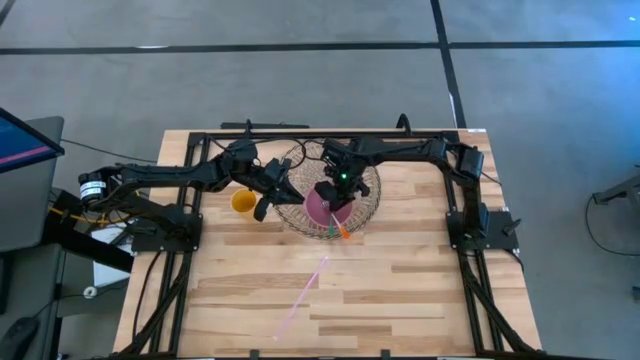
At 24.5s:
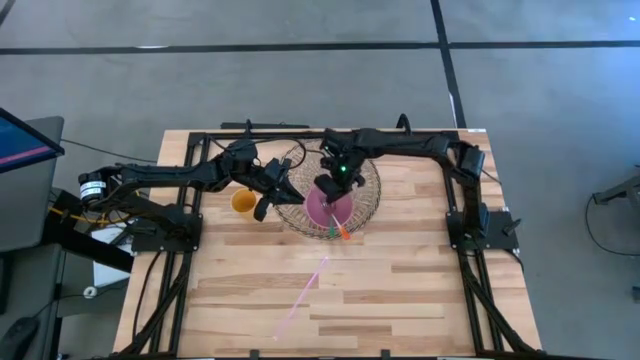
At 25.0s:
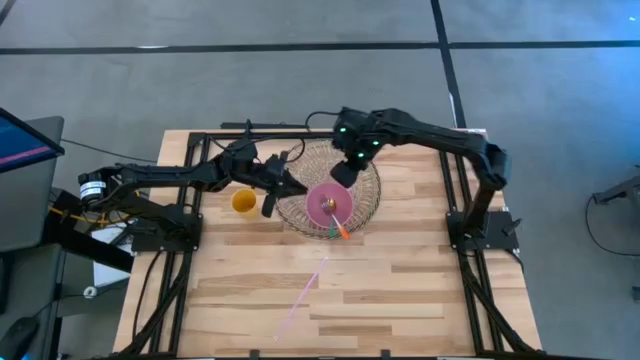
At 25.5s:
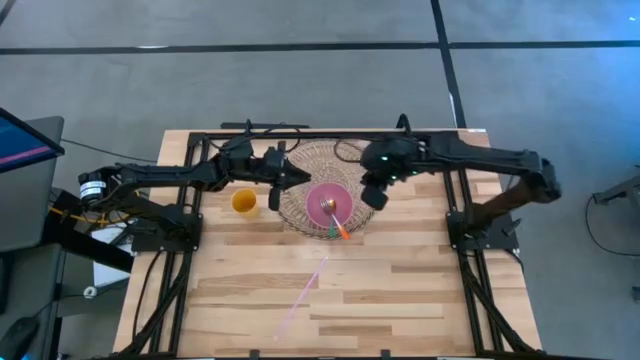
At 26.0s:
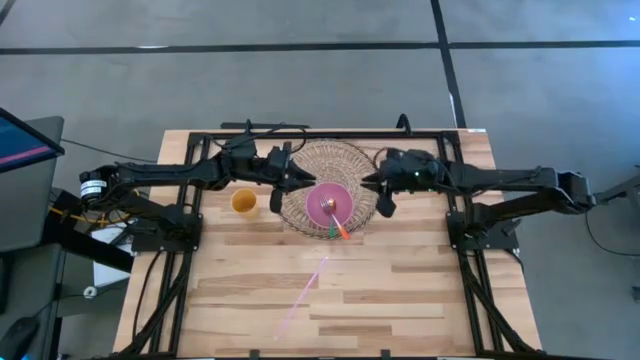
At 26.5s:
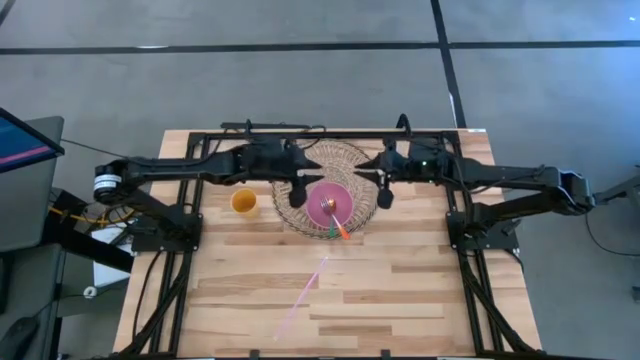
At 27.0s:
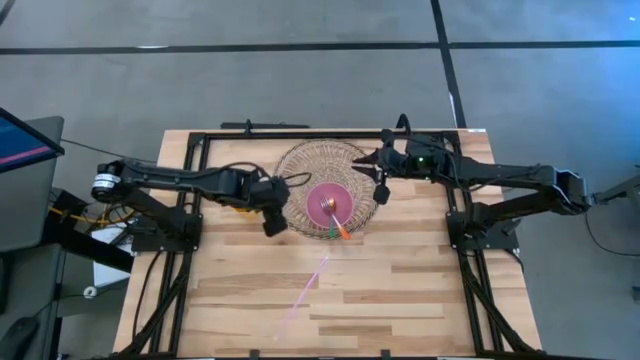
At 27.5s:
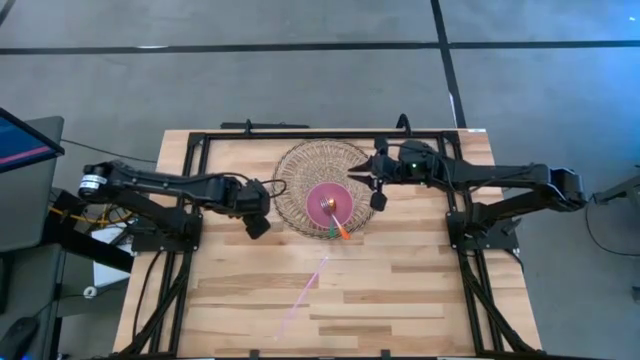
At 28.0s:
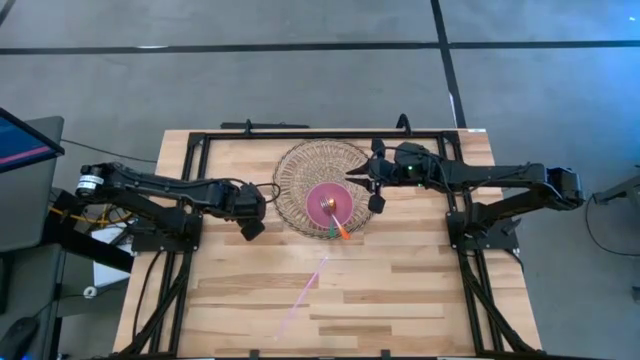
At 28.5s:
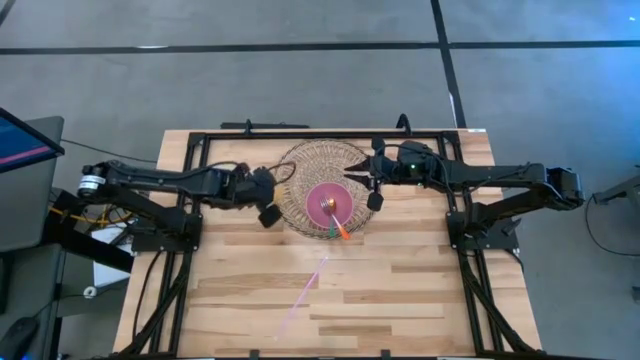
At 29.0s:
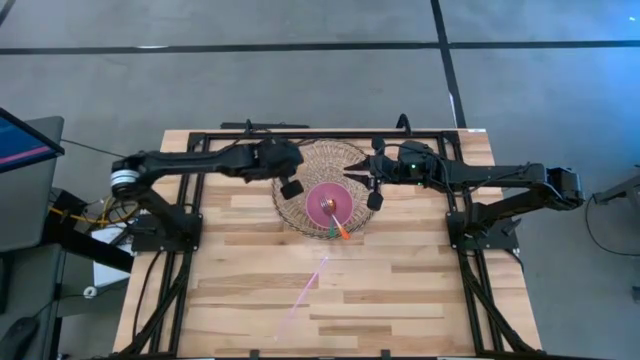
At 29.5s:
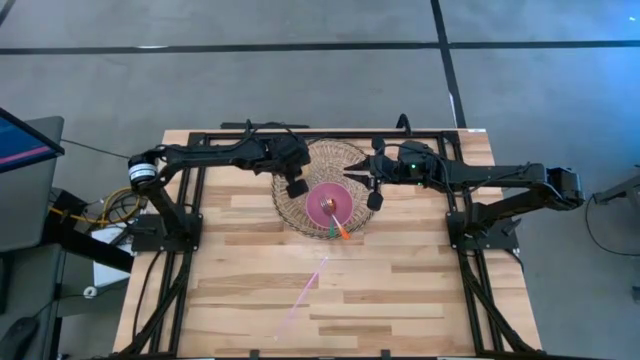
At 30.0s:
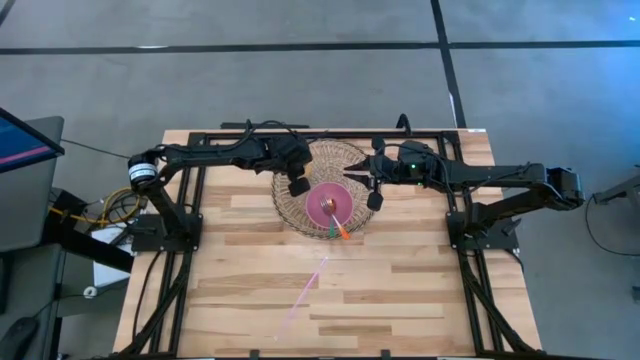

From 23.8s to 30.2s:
Task: Pick & Place Utensil
Put the yellow cup on the brown mat to the top left of the pink bowl

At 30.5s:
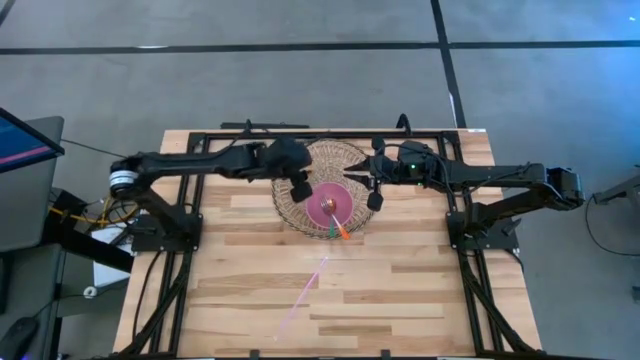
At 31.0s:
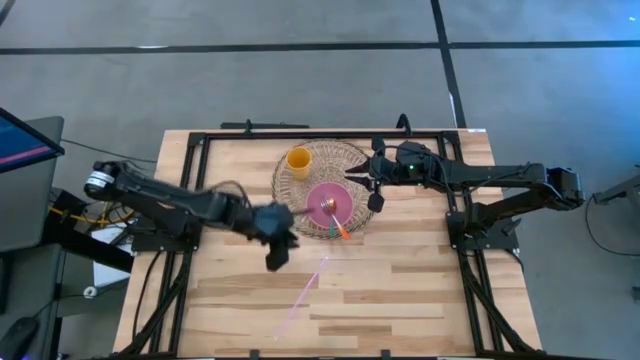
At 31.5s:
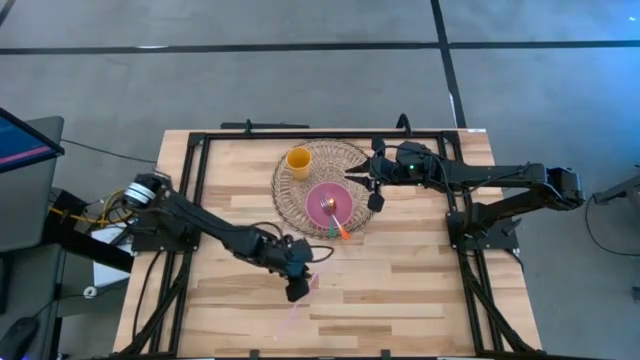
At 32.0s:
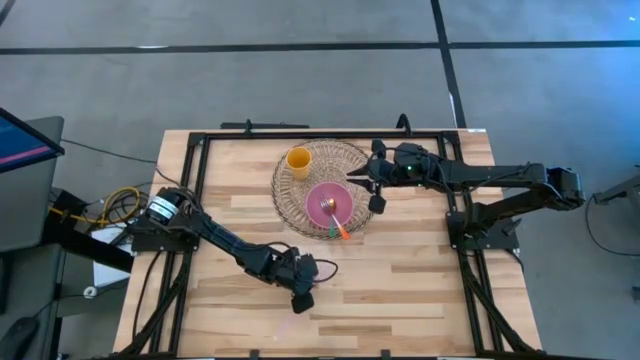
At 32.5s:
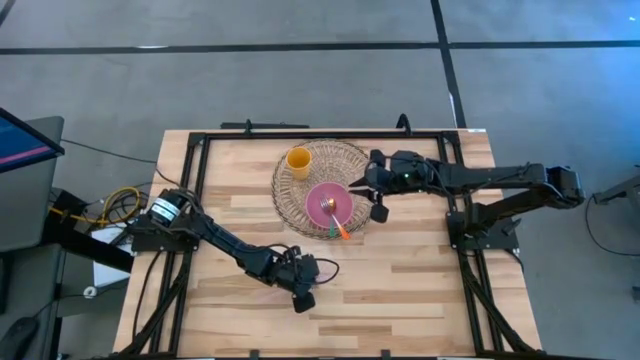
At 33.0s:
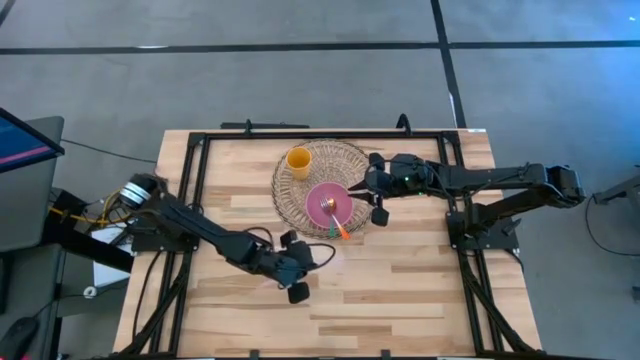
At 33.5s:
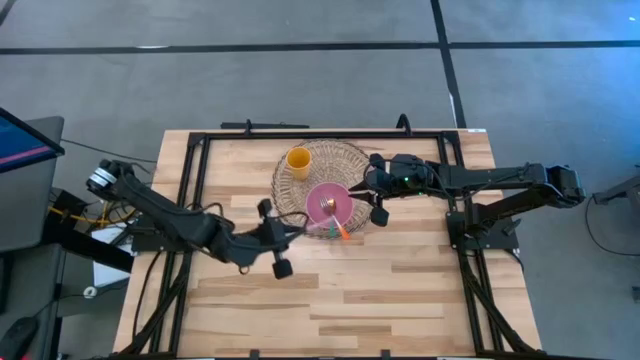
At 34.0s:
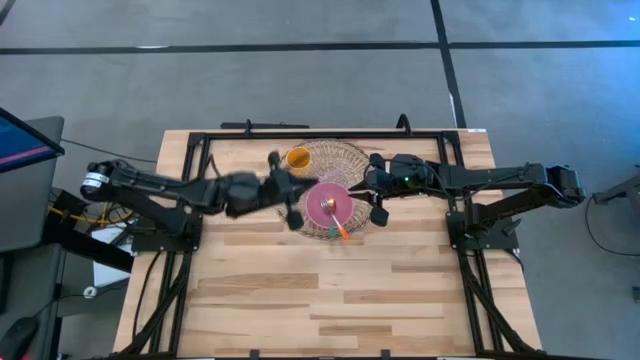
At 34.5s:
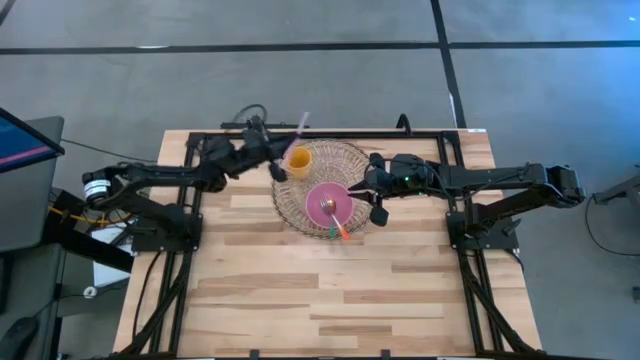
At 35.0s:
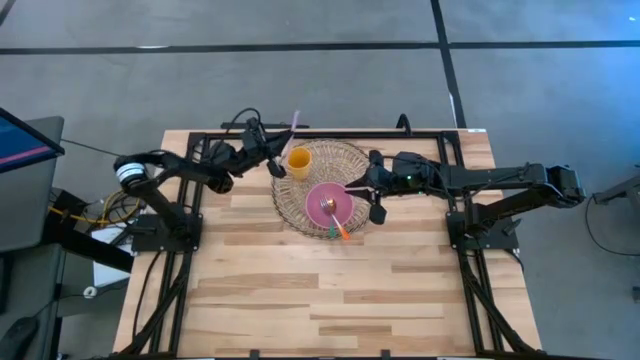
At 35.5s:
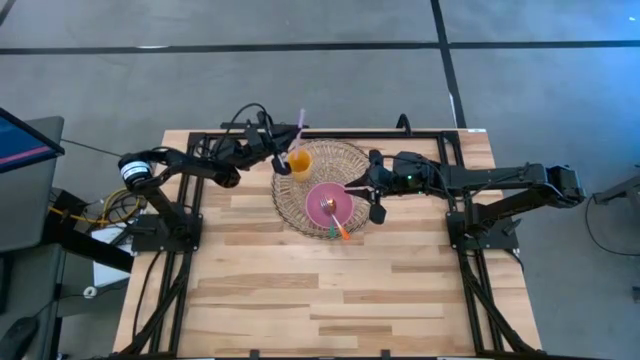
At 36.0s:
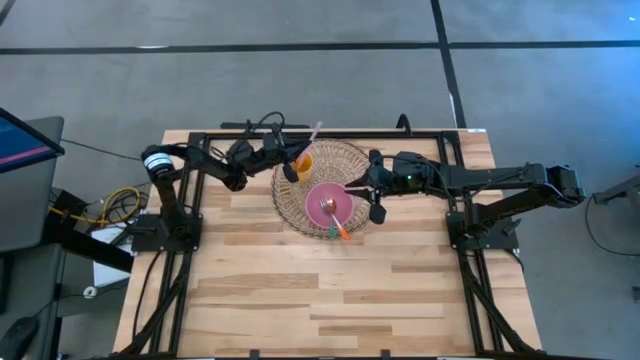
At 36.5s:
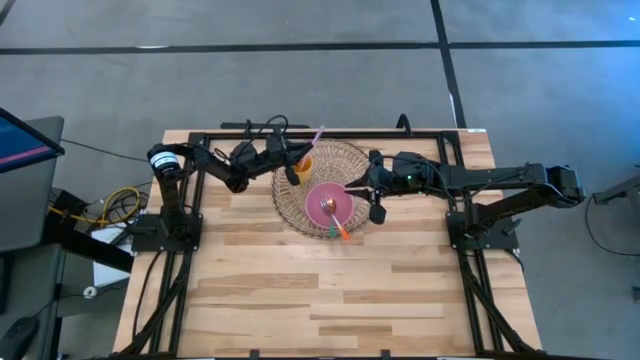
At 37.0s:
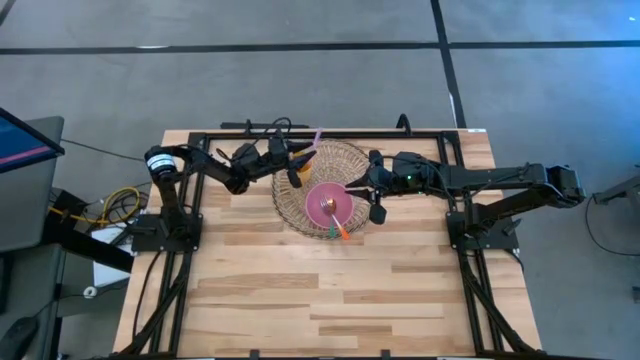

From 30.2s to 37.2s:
Put the pink straw into the yellow cup

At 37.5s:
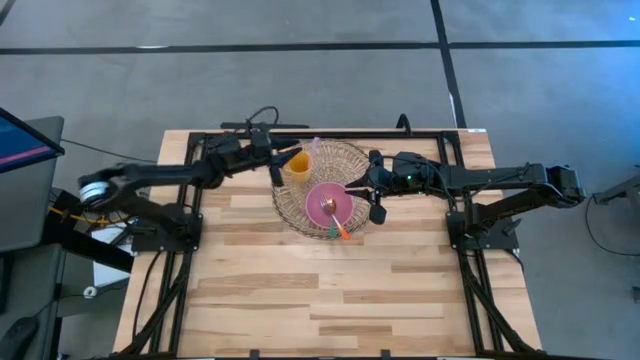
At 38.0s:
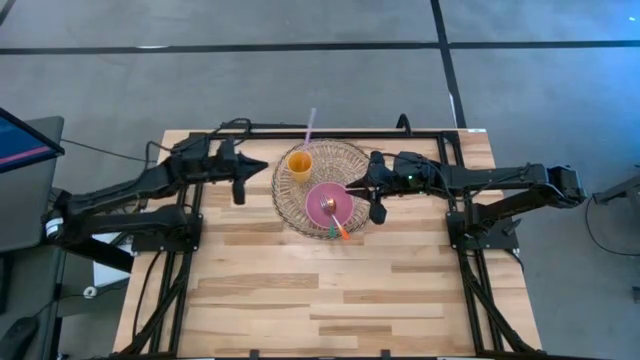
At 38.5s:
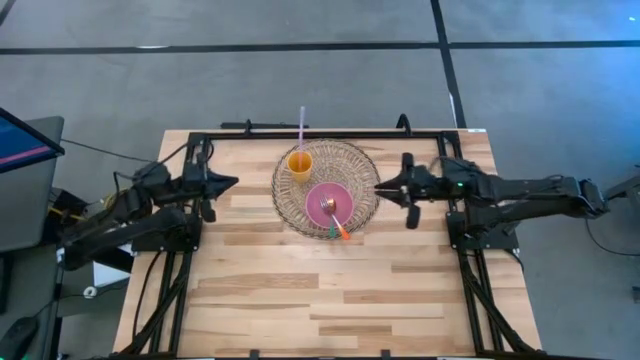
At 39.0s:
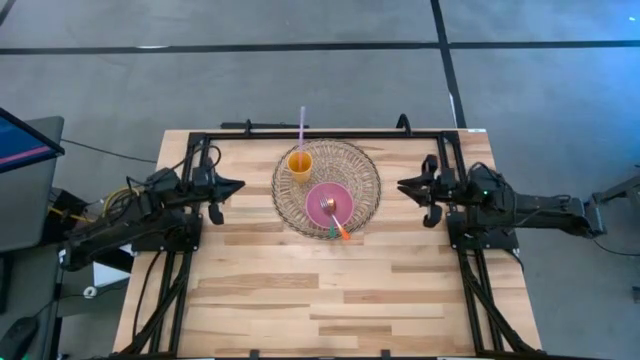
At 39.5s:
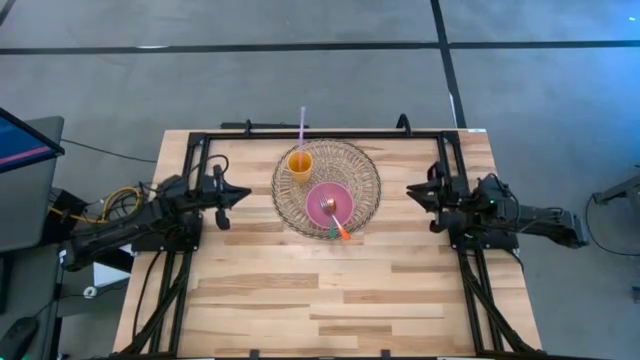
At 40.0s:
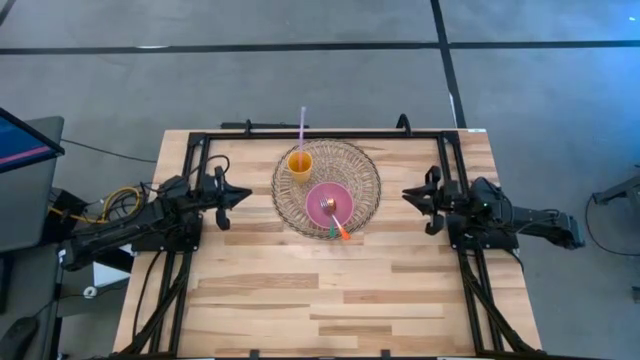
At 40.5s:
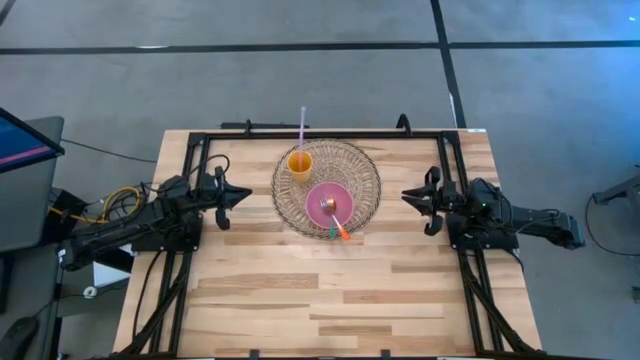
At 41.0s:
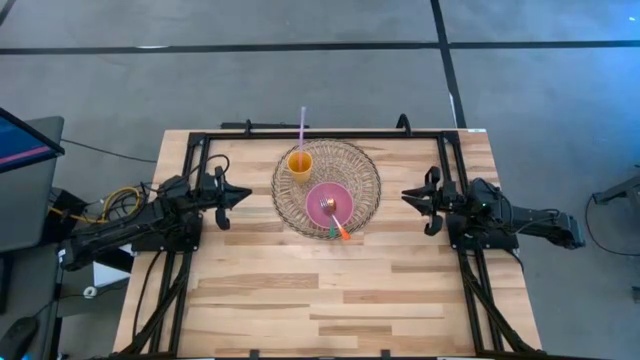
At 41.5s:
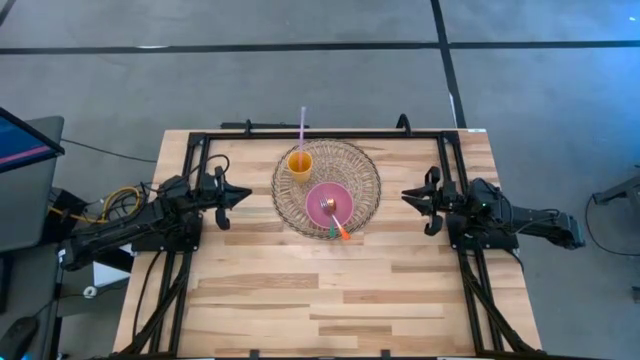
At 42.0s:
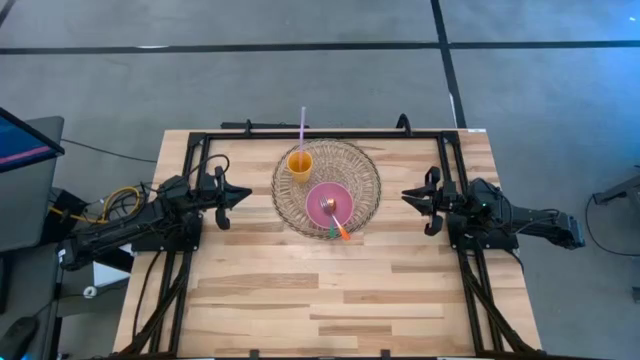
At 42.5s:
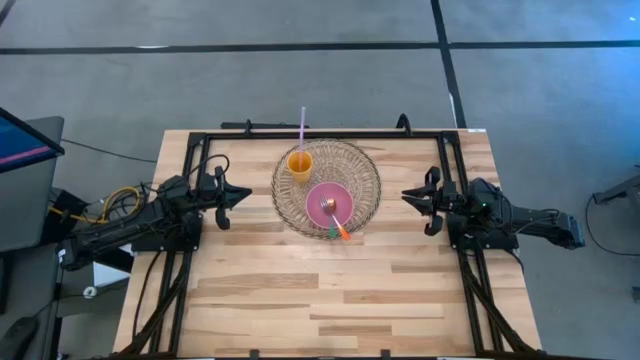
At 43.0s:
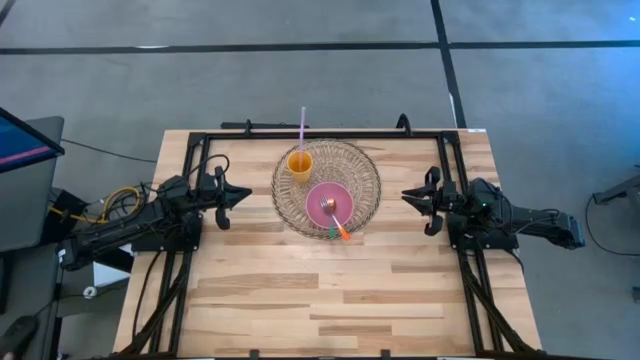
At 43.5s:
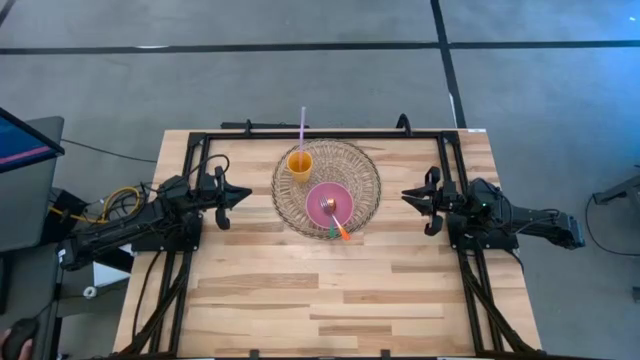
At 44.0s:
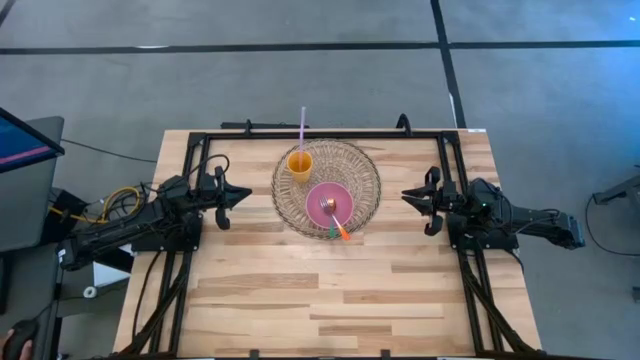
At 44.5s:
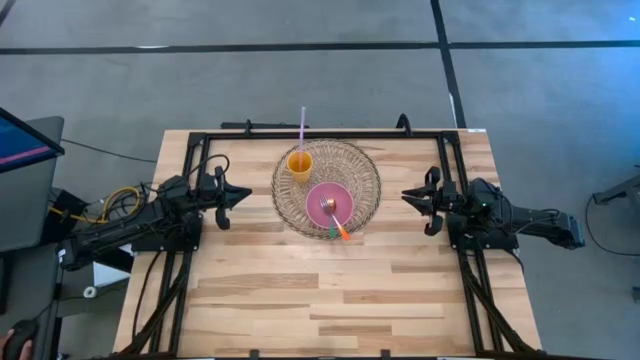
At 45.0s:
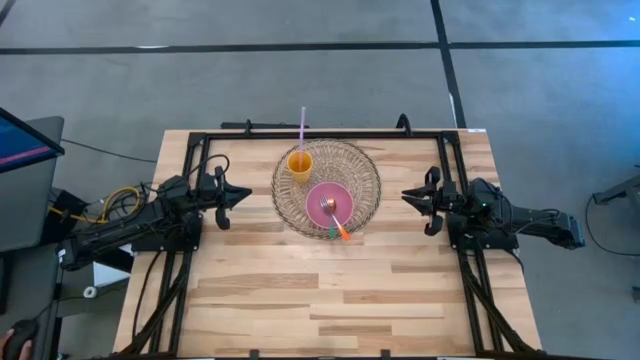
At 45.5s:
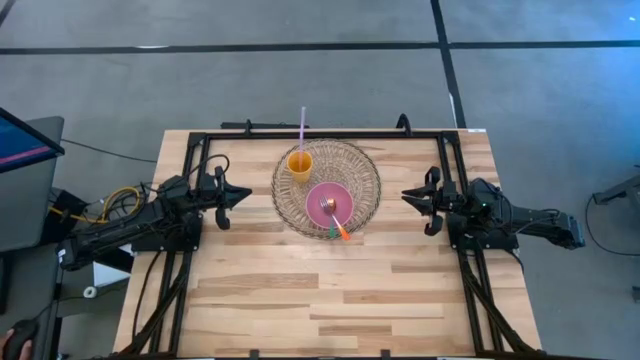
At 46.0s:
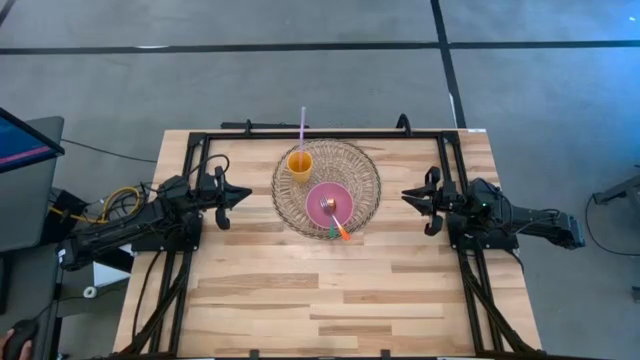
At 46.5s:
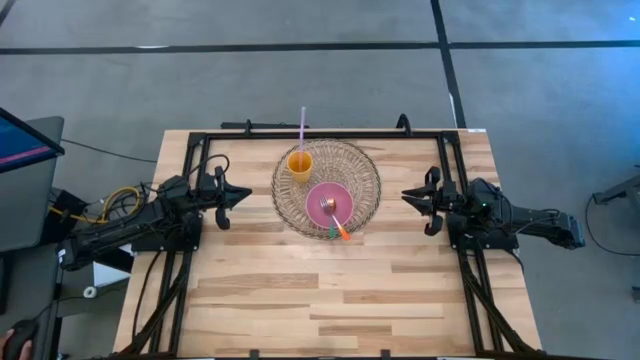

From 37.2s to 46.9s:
Return to Home Position
